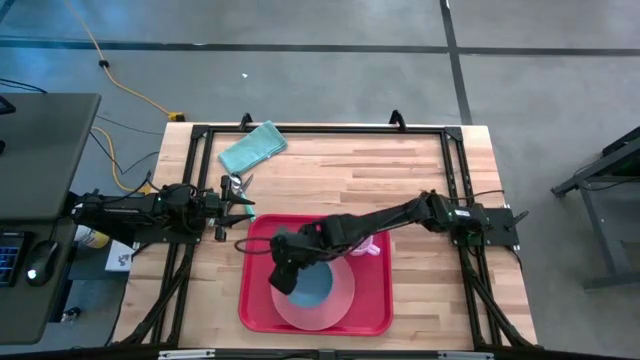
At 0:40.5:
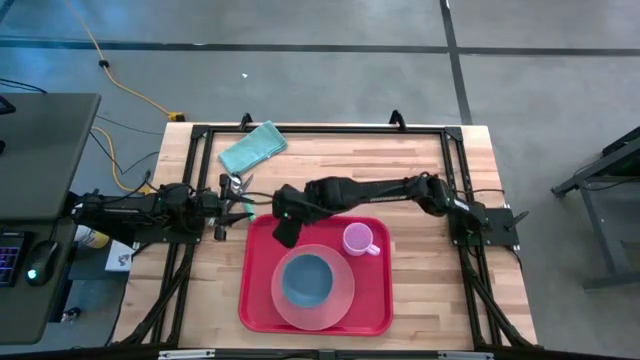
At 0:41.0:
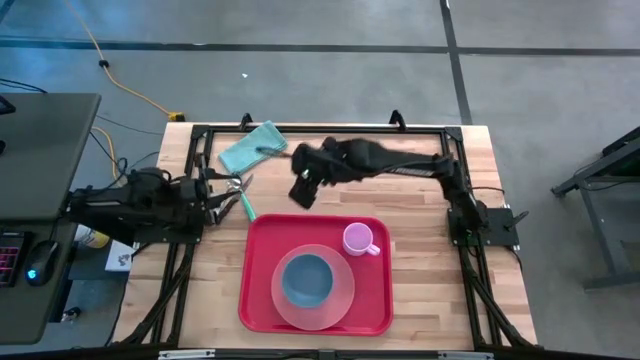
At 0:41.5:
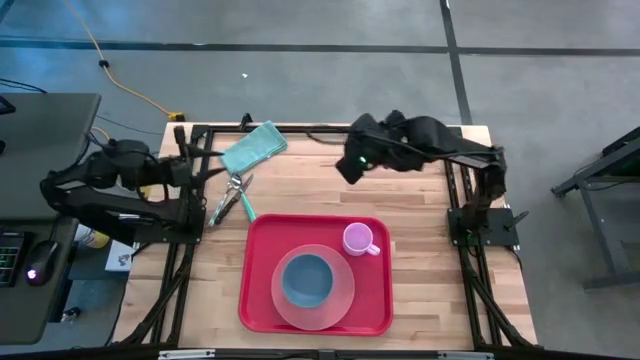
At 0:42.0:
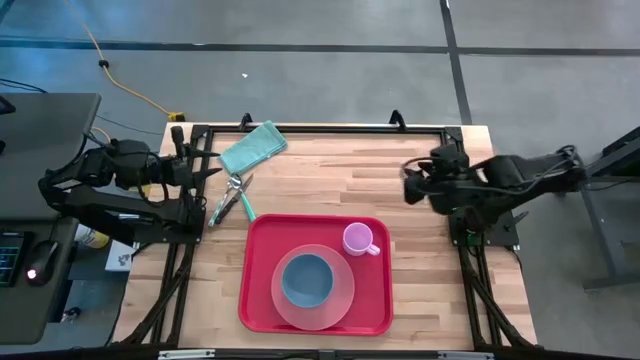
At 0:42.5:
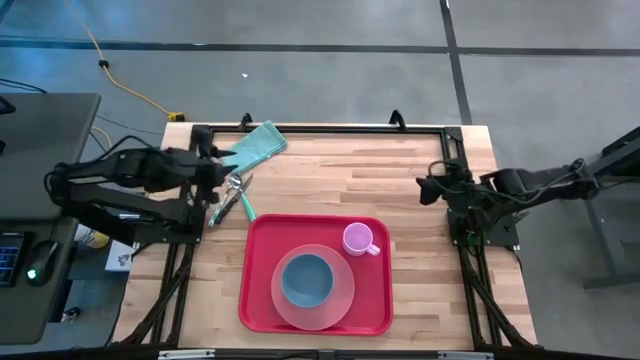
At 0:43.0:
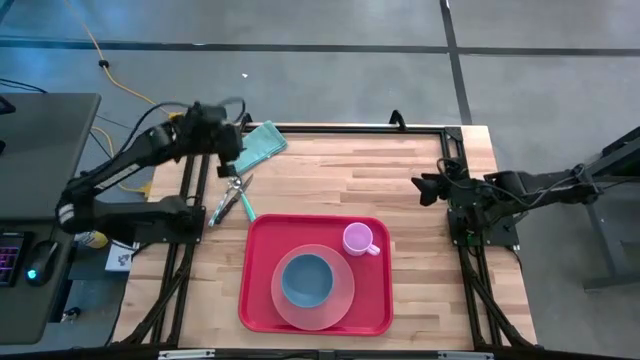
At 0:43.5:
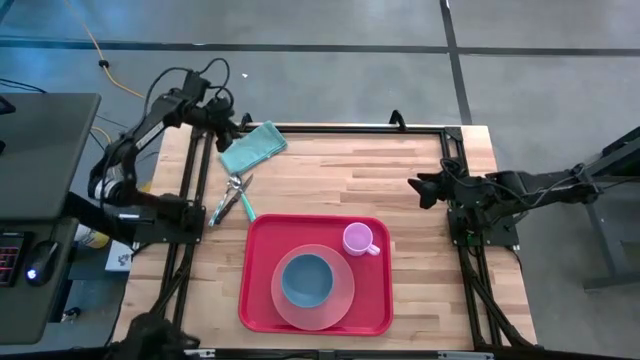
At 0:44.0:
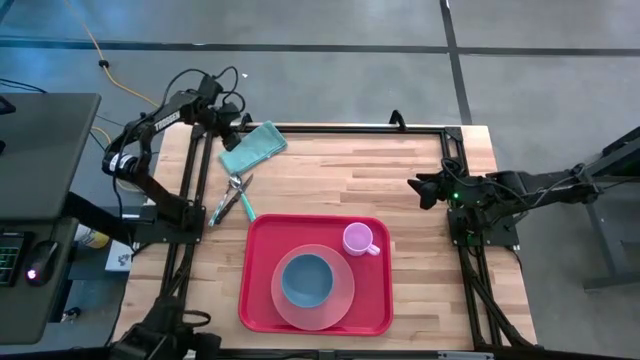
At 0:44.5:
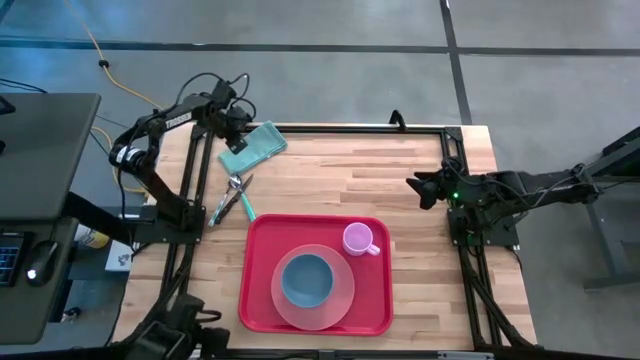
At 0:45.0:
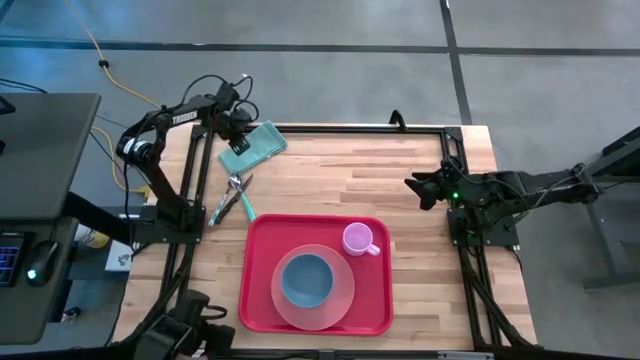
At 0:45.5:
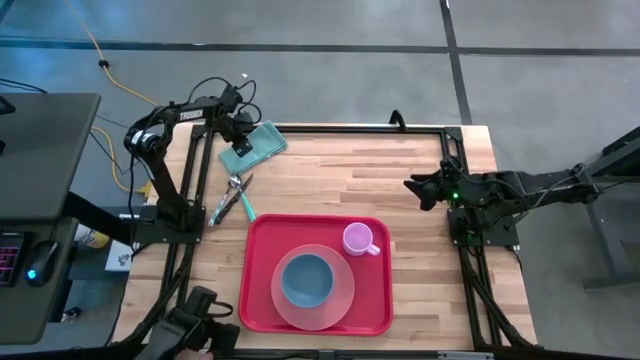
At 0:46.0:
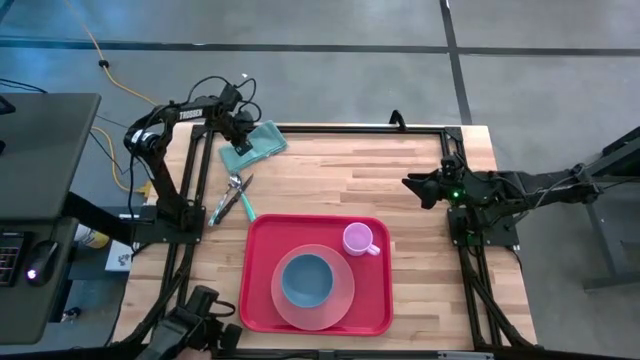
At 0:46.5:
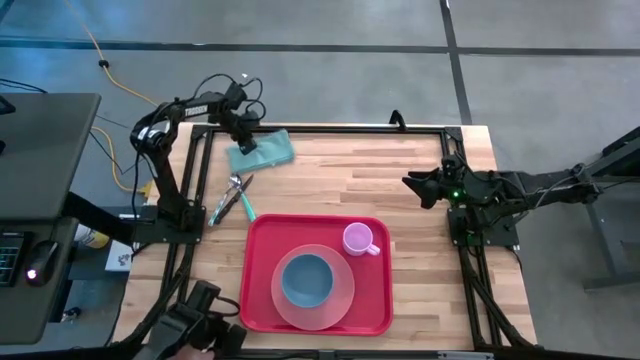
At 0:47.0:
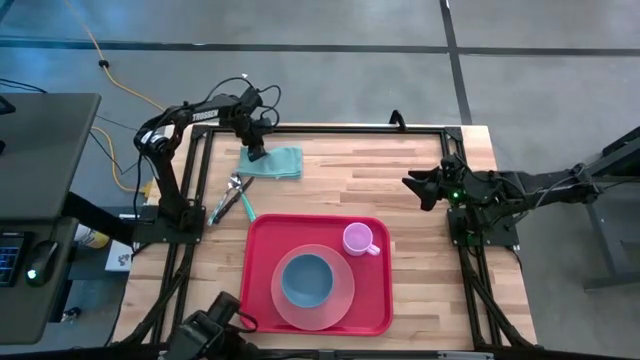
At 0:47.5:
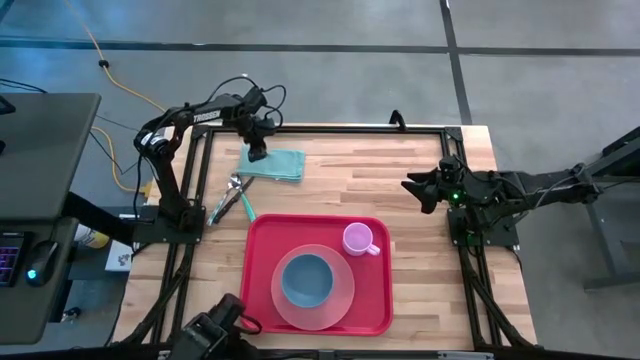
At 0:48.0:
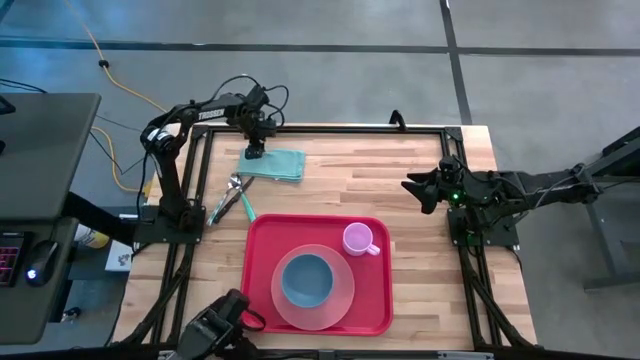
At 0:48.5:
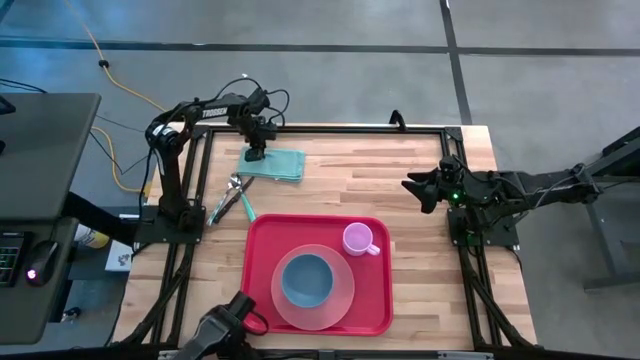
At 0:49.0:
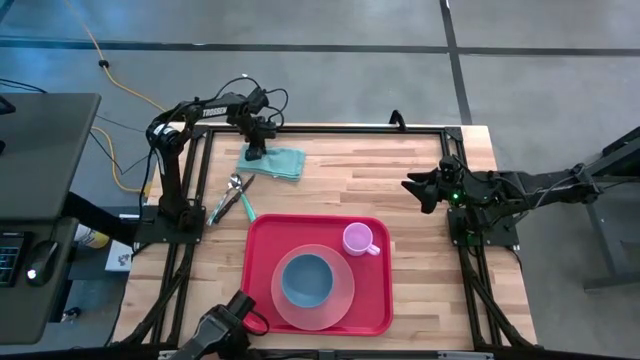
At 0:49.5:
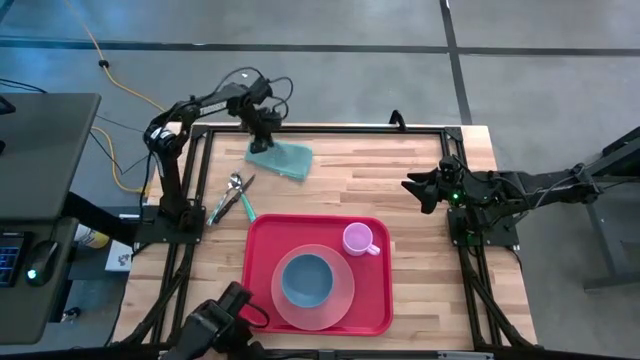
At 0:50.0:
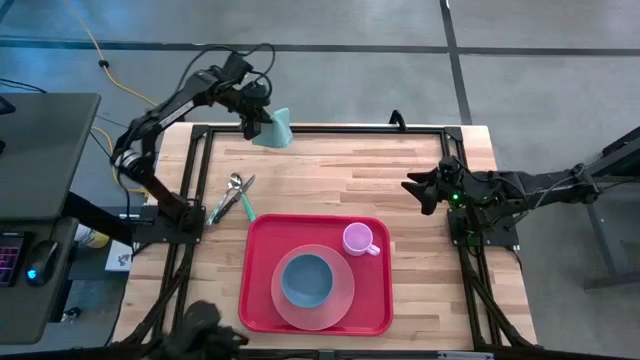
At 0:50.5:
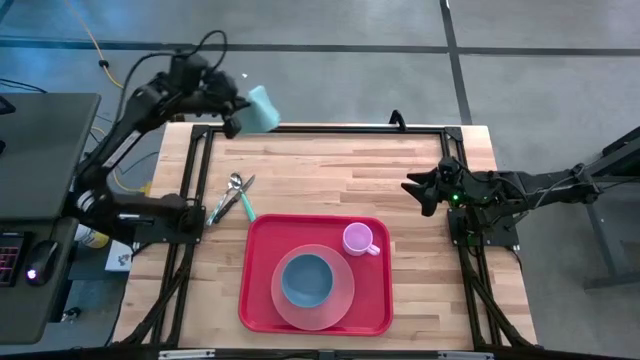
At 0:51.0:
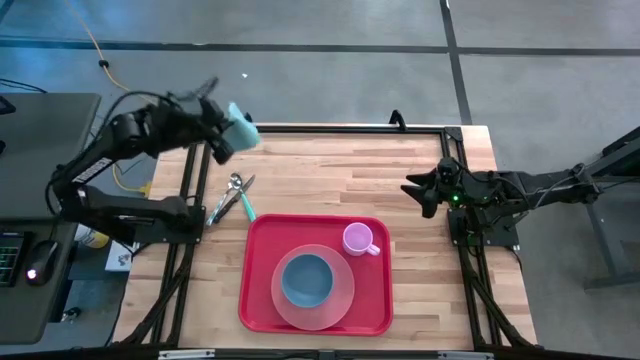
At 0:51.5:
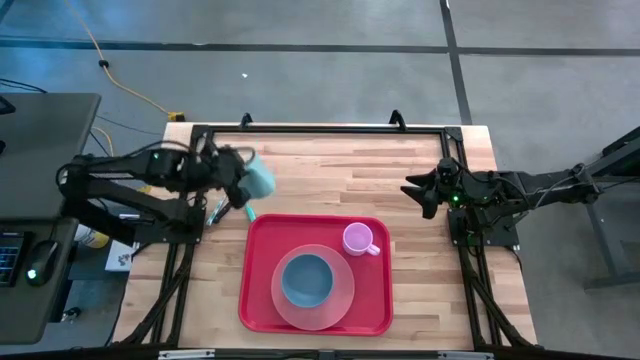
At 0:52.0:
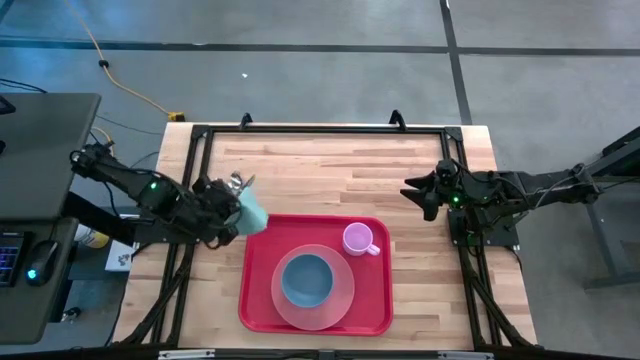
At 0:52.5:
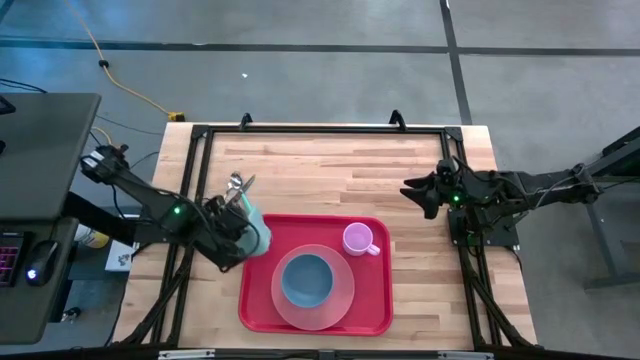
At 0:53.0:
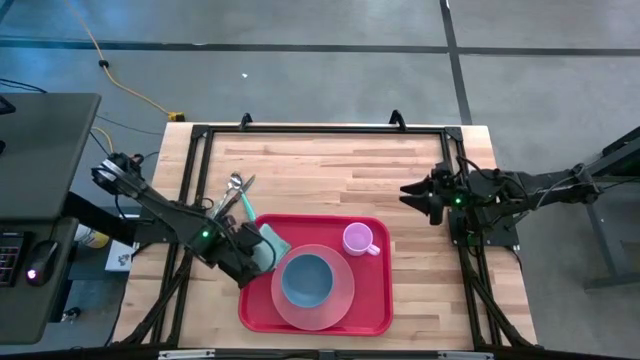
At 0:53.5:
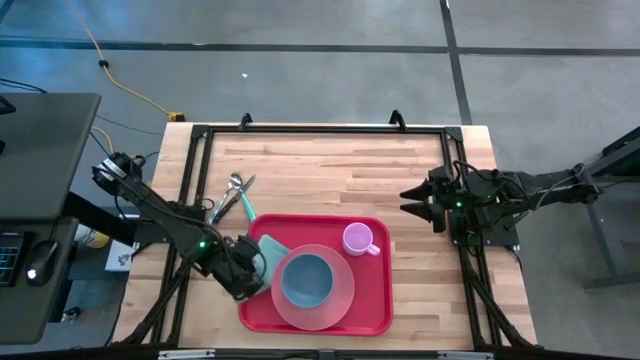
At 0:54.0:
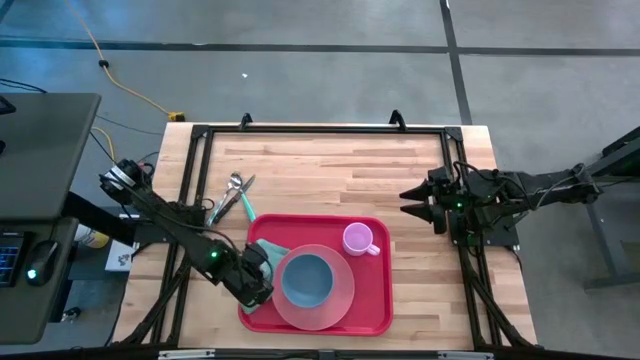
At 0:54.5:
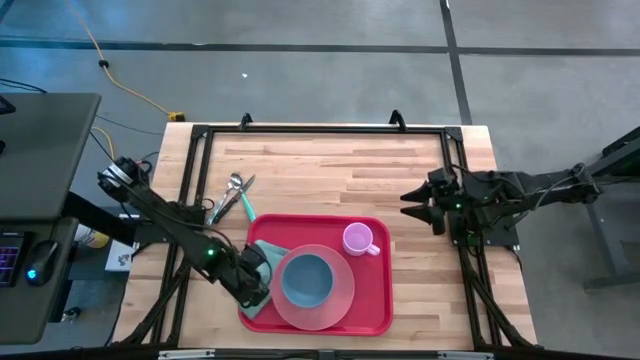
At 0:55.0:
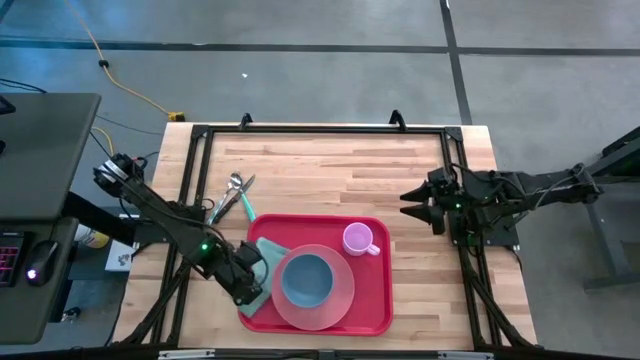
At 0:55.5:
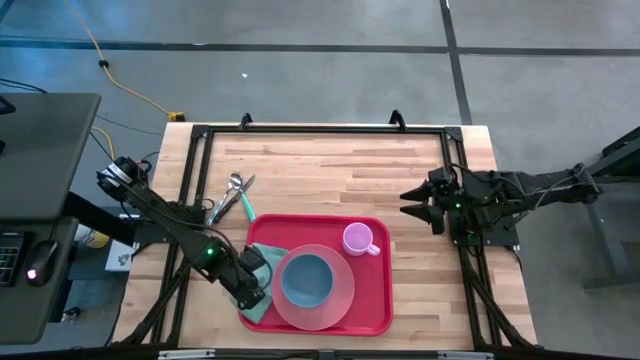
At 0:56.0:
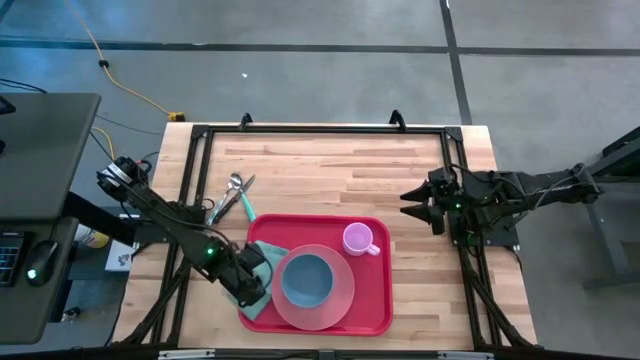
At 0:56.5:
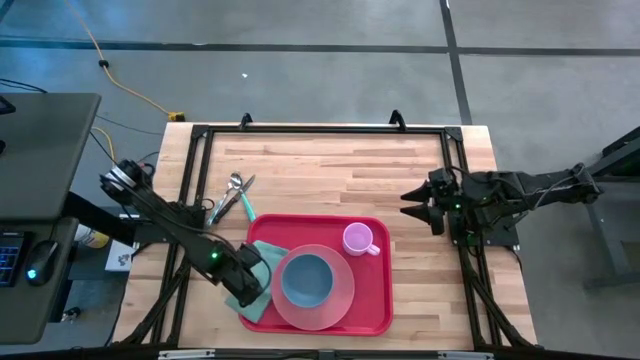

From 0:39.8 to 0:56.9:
Task: Set up tray
Put the light blue table napkin on the red serving tray to the left side of the pink plate

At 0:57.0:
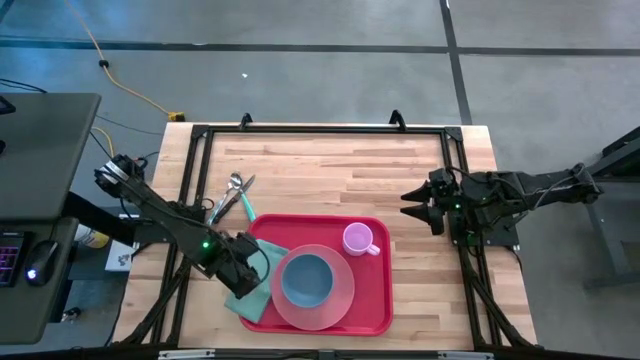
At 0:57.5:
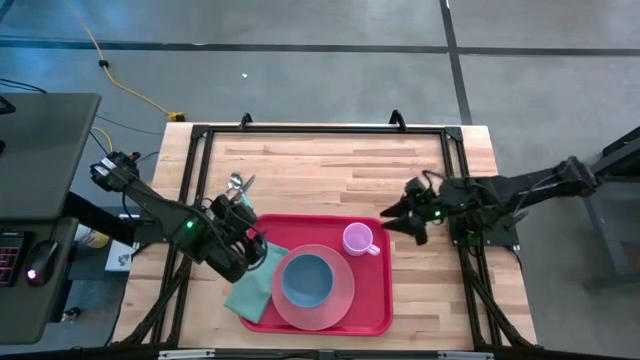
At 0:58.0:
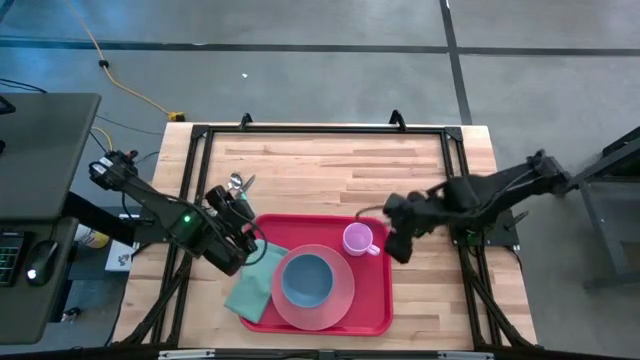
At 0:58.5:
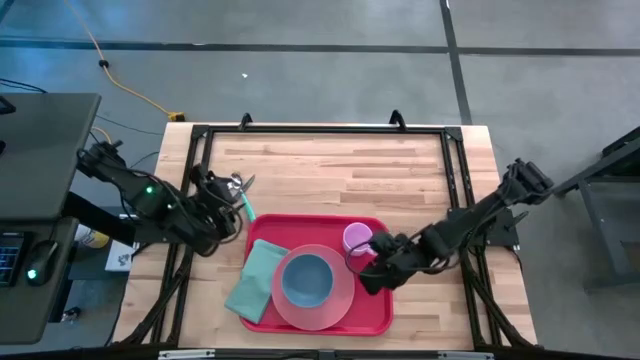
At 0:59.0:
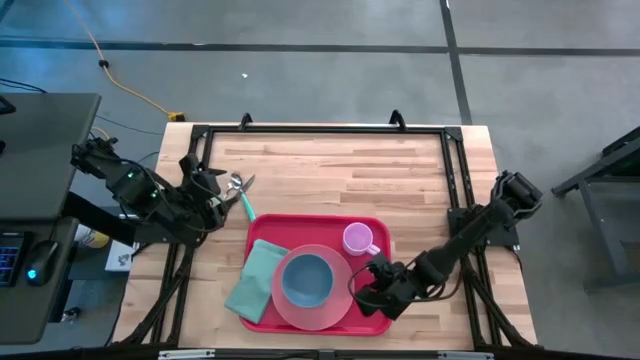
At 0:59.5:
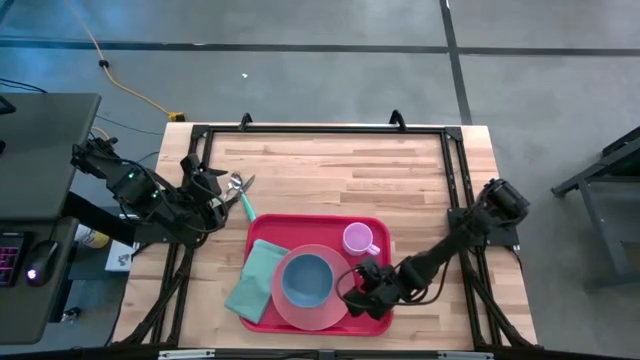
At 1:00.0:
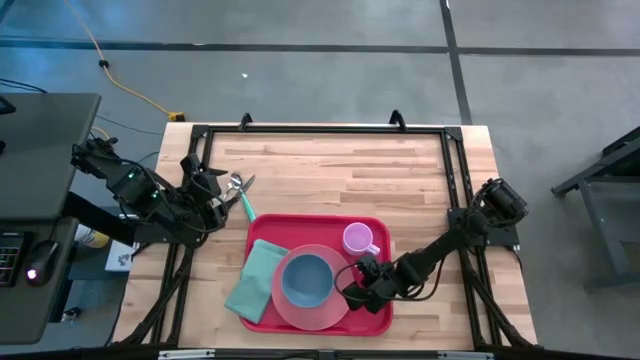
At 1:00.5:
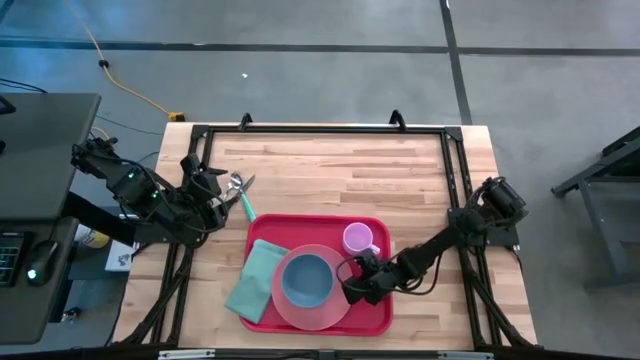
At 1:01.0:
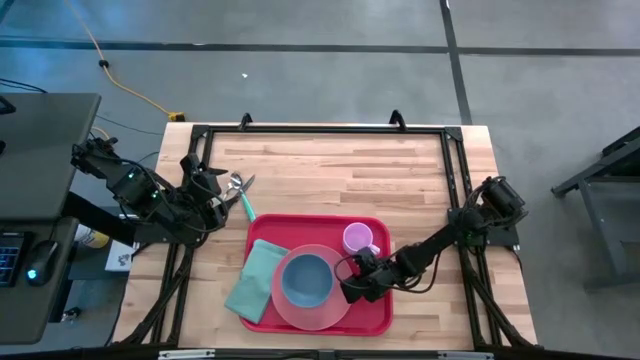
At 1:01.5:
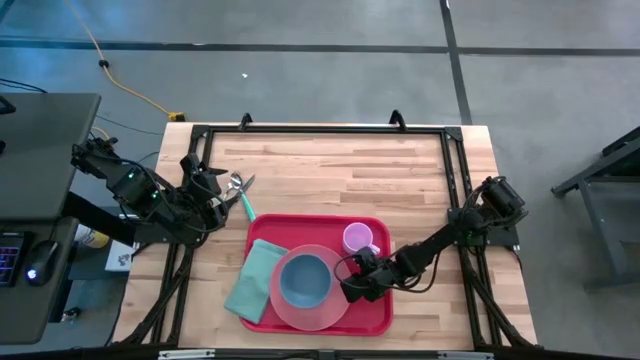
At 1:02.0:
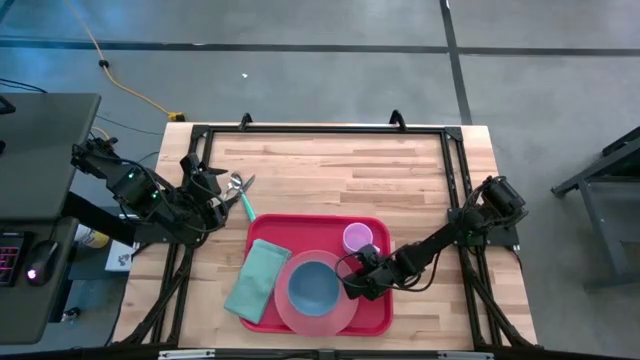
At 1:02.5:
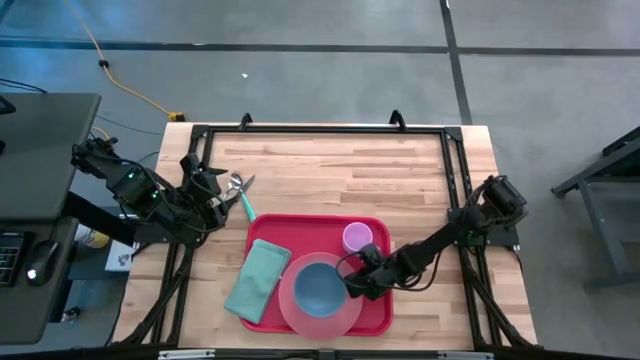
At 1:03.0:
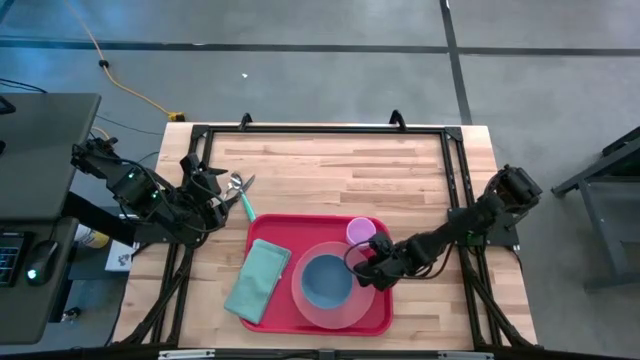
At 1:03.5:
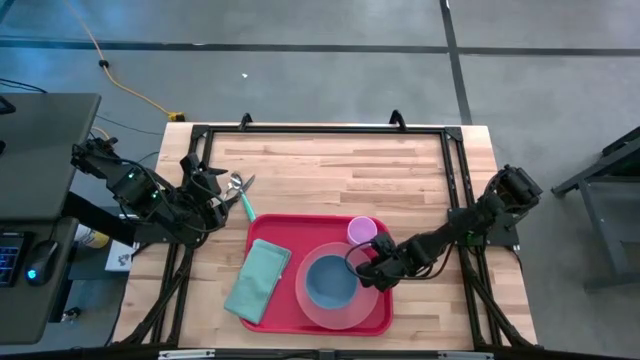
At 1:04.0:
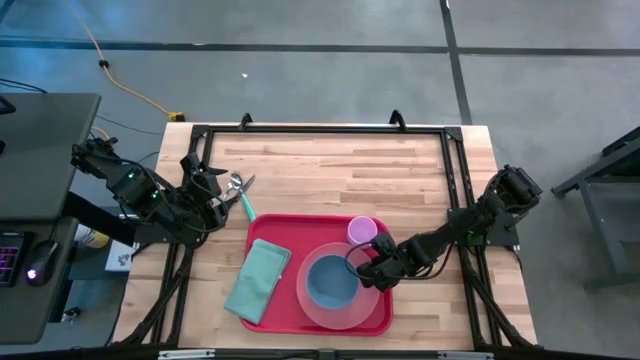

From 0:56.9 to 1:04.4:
Move the pink plate to the right side on the red serving tray
